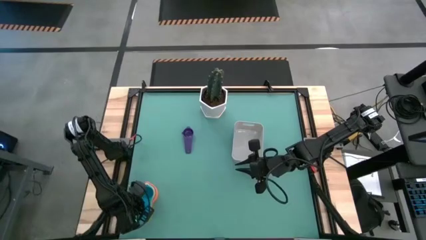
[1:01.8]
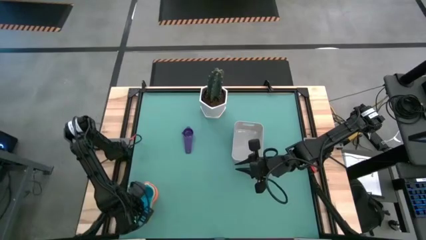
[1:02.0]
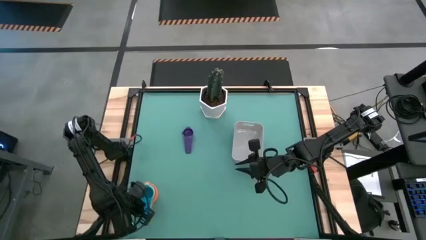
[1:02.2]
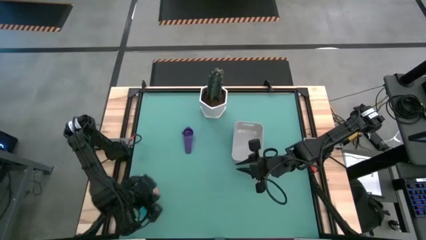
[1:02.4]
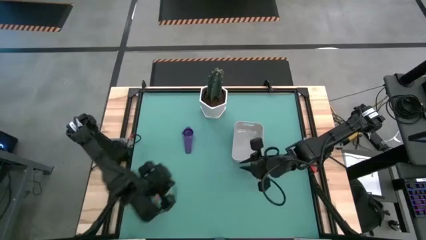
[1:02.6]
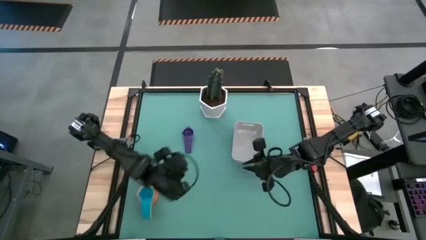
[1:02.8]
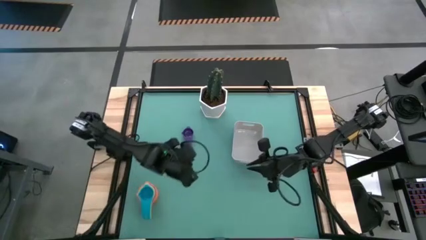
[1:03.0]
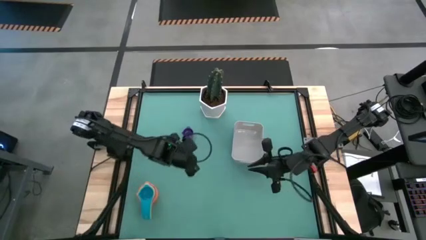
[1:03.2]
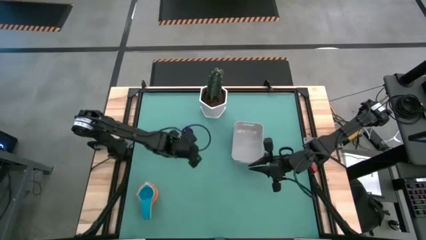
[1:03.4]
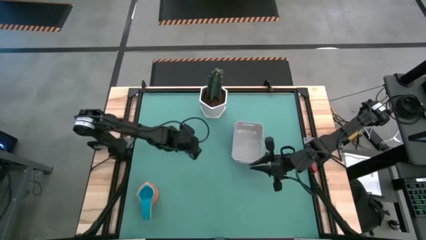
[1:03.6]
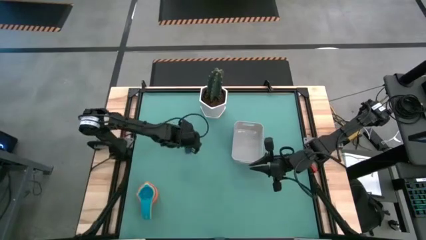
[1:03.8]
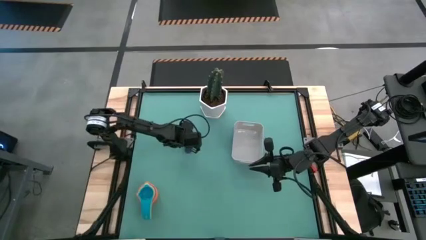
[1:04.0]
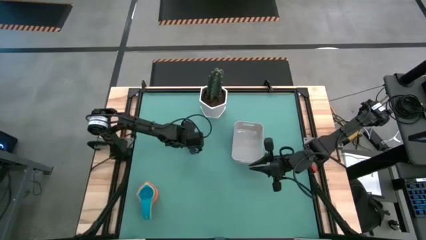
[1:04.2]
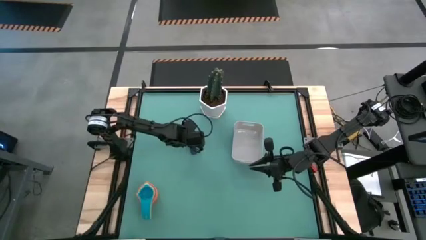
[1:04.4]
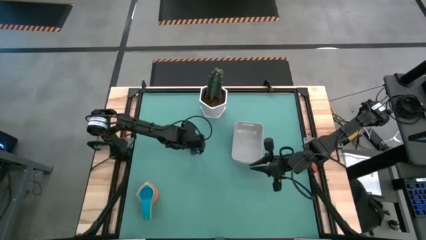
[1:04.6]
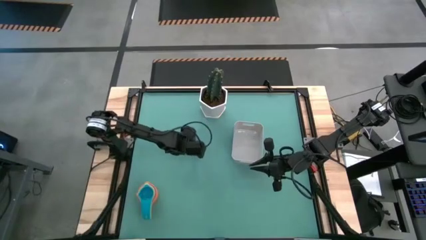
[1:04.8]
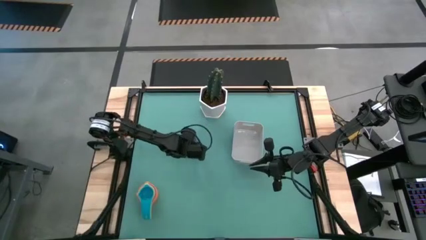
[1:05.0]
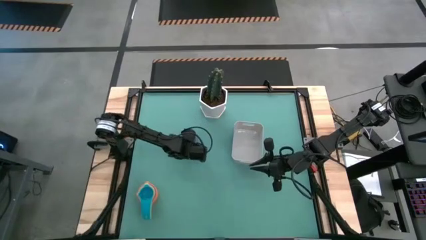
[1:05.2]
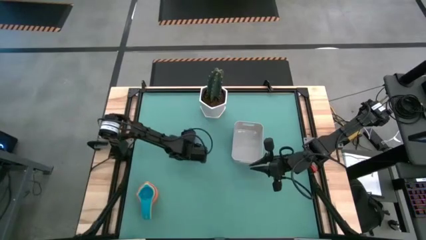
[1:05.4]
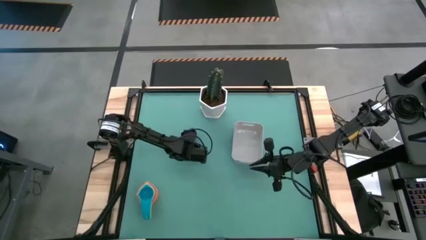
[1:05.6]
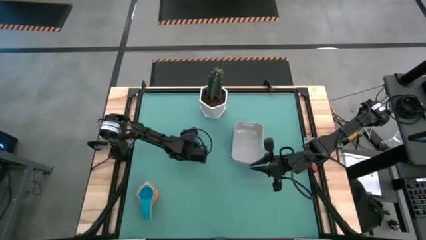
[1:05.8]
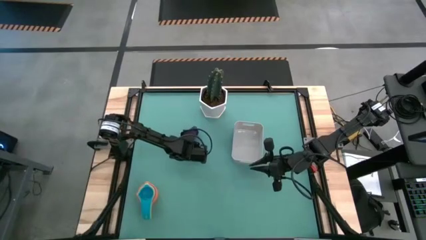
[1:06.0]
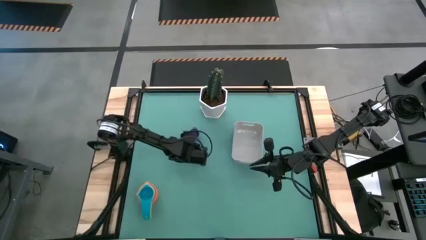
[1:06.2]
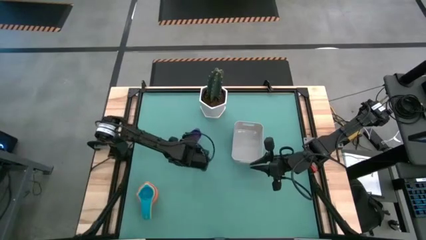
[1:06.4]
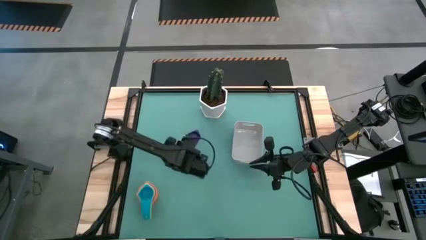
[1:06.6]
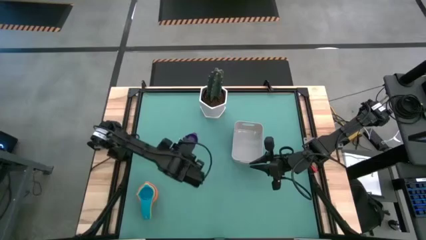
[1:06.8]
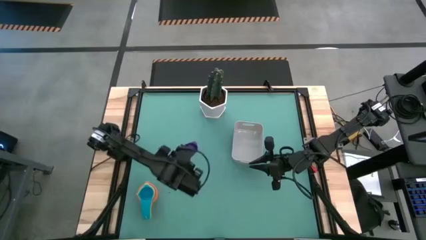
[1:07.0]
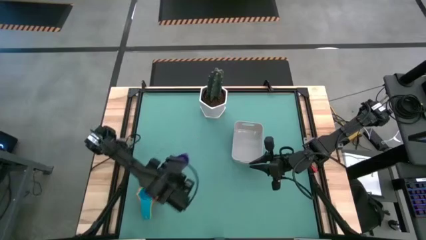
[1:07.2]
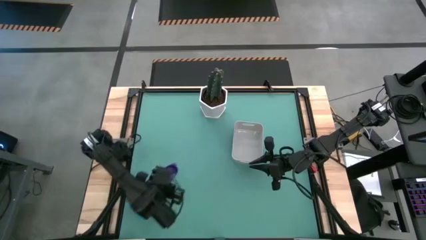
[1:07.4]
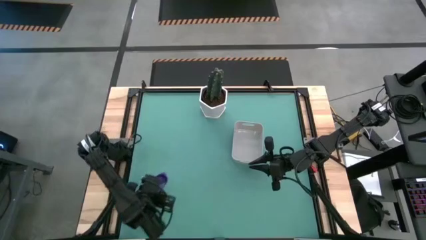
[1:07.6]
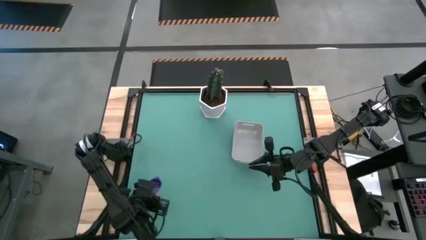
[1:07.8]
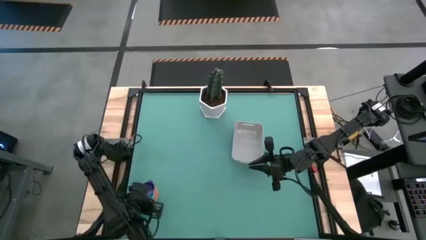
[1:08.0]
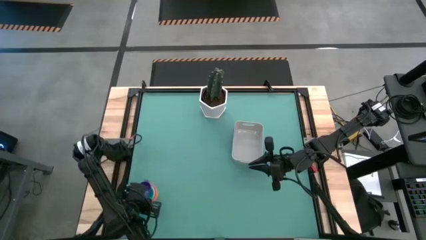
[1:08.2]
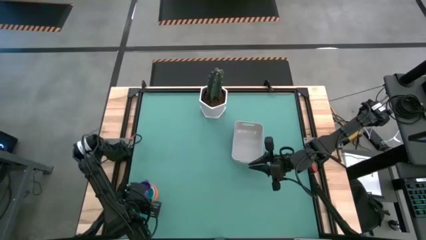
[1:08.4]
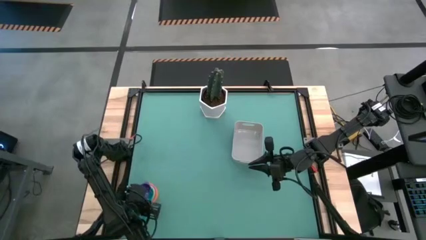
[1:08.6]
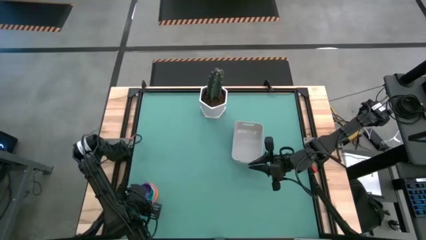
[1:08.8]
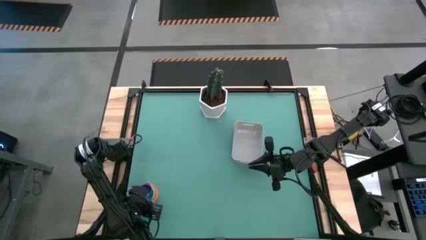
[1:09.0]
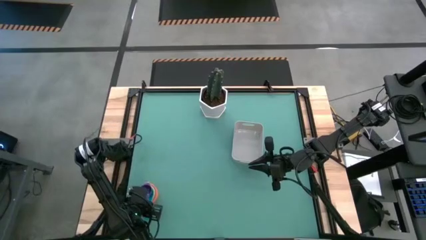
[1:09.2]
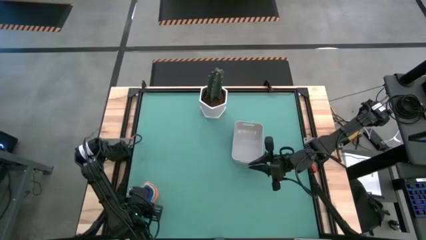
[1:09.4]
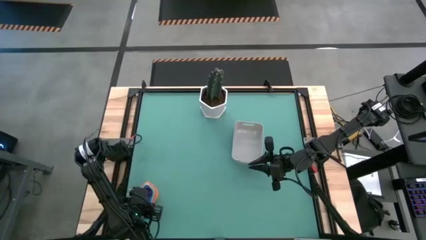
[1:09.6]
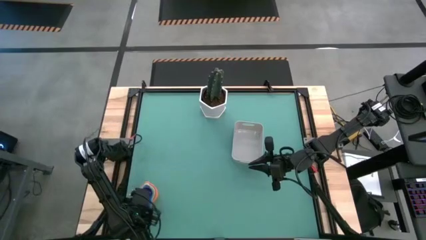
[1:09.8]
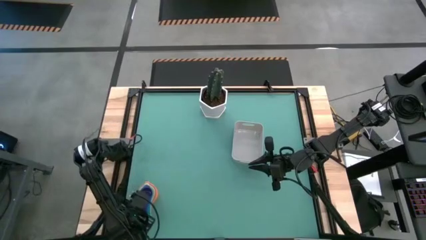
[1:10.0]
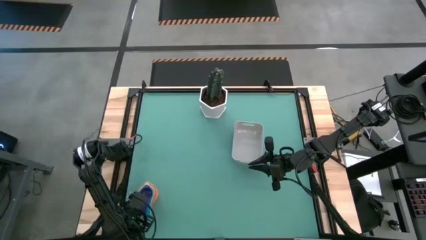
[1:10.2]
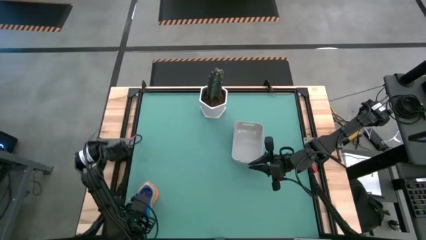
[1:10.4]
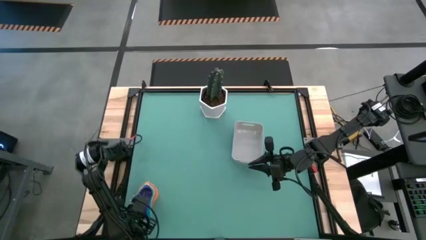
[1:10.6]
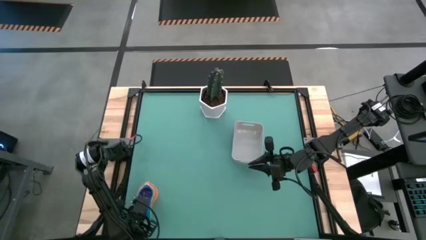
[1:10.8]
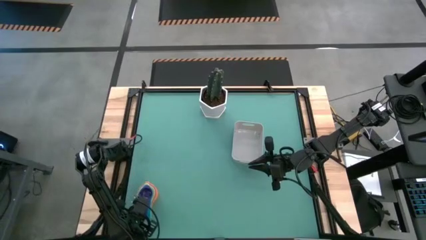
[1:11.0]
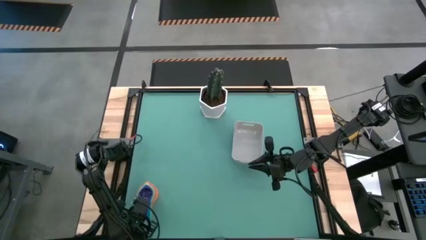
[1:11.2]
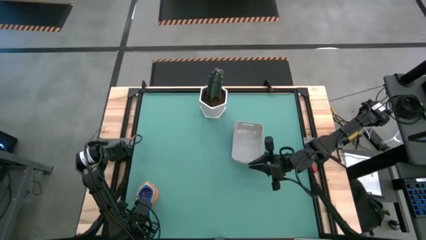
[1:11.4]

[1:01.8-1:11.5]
Task: Nest measuring cups in basket
Stack the violet measuring cup on the top of the light blue measuring cup

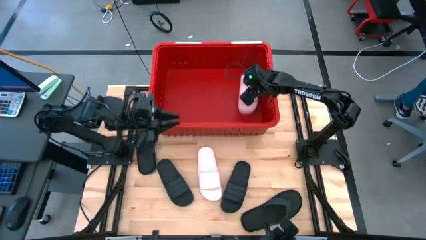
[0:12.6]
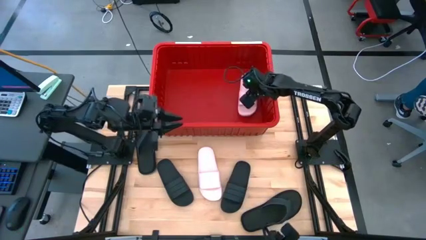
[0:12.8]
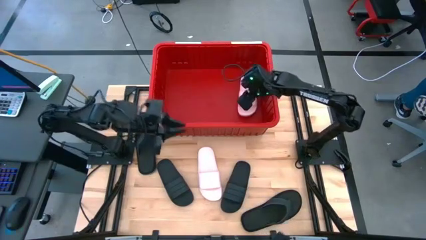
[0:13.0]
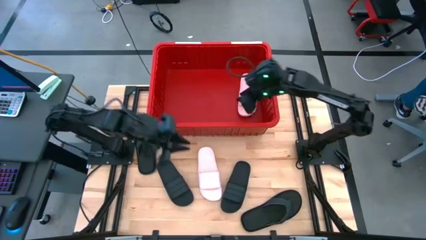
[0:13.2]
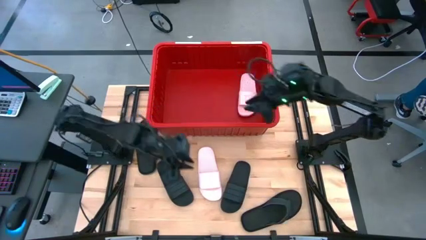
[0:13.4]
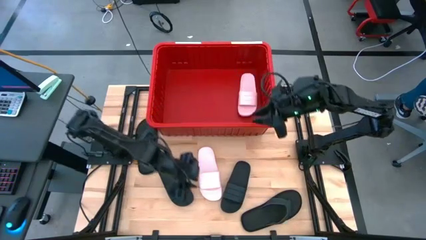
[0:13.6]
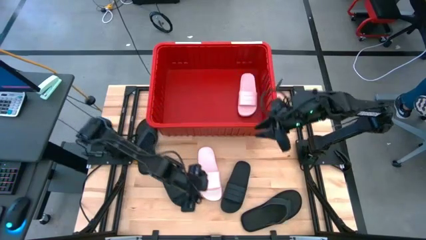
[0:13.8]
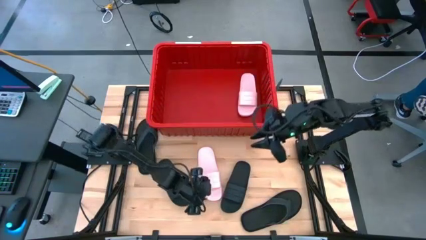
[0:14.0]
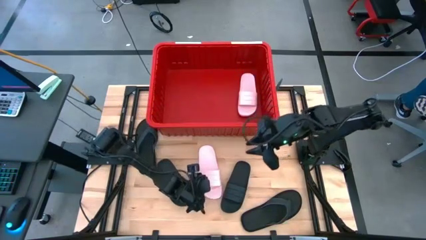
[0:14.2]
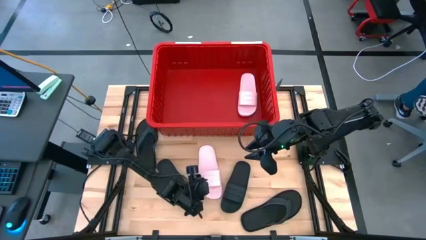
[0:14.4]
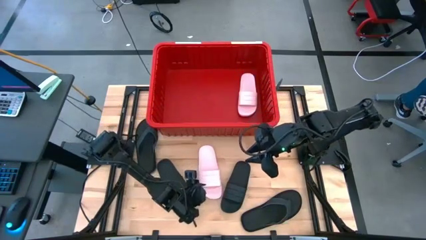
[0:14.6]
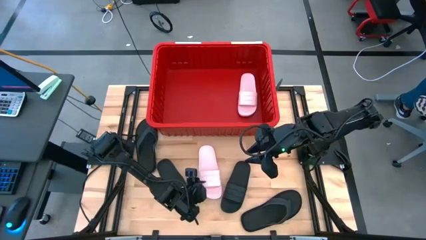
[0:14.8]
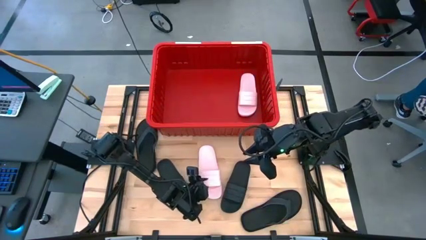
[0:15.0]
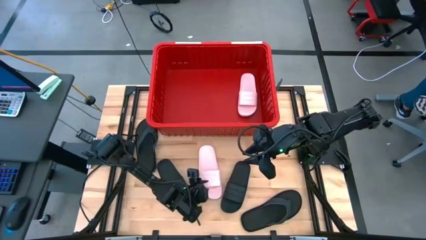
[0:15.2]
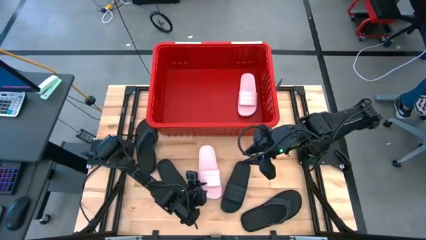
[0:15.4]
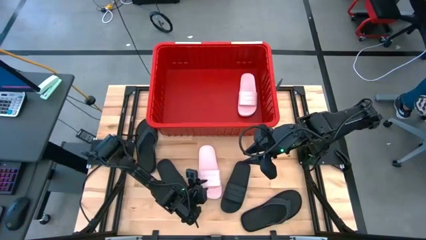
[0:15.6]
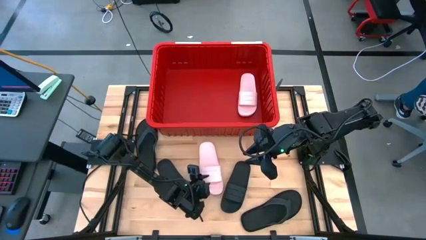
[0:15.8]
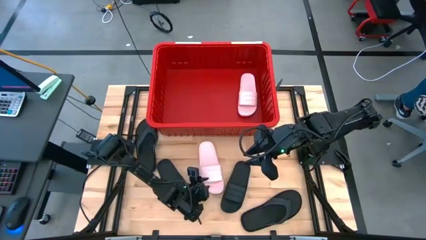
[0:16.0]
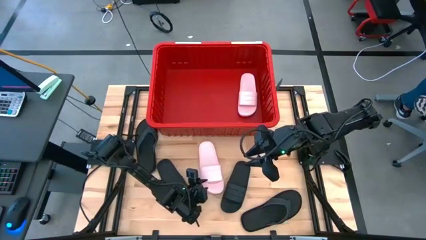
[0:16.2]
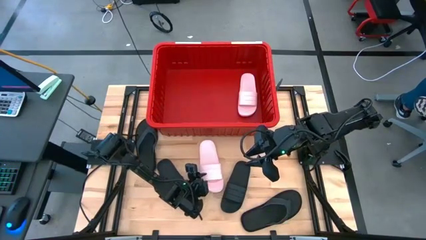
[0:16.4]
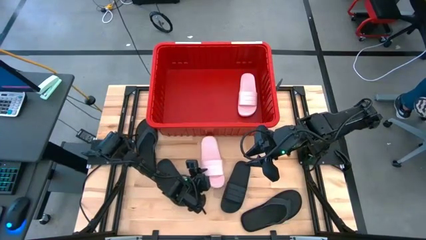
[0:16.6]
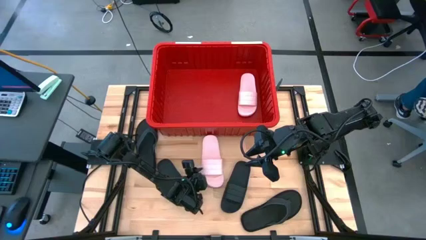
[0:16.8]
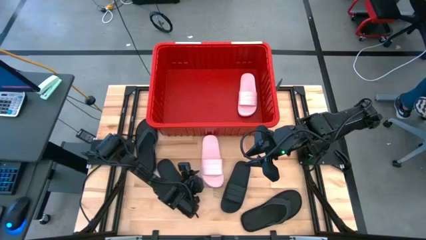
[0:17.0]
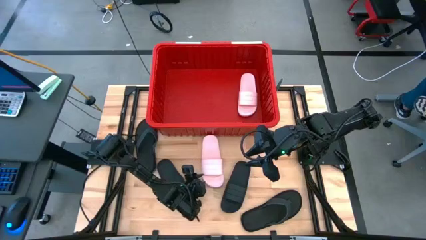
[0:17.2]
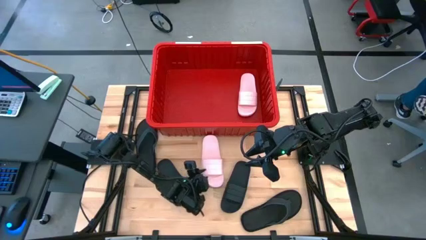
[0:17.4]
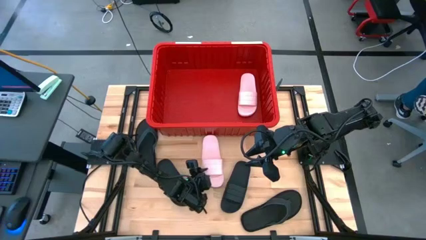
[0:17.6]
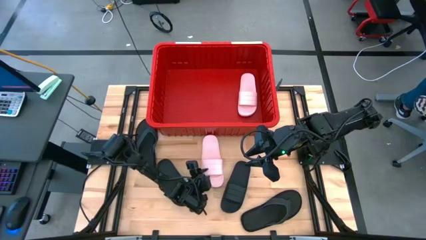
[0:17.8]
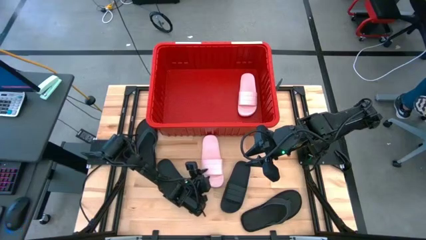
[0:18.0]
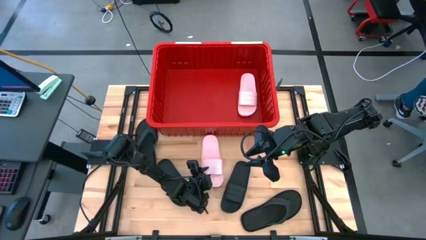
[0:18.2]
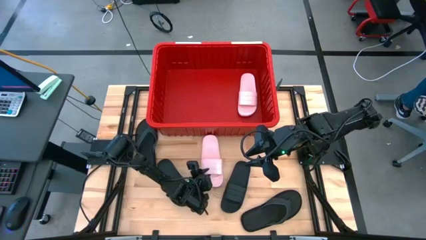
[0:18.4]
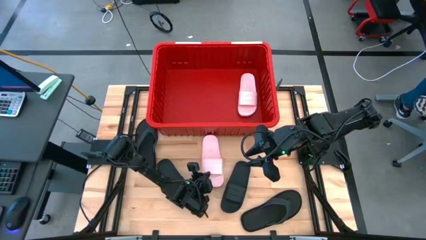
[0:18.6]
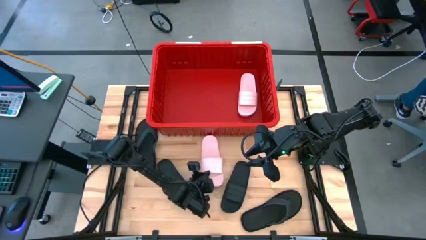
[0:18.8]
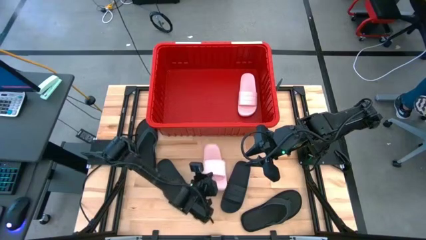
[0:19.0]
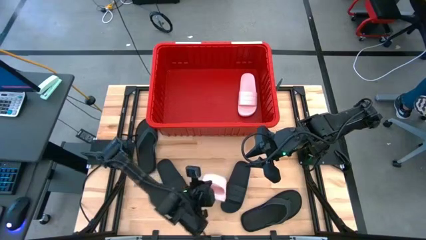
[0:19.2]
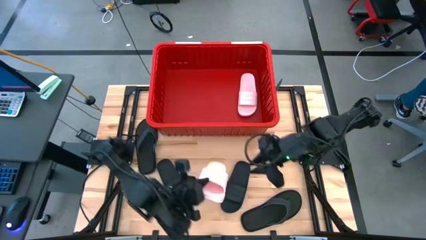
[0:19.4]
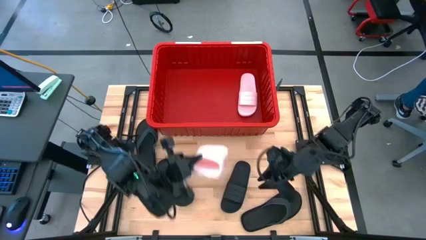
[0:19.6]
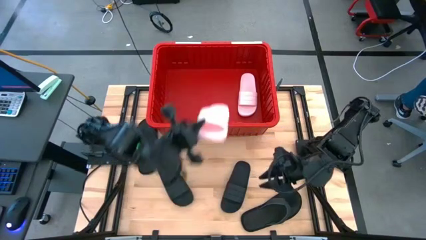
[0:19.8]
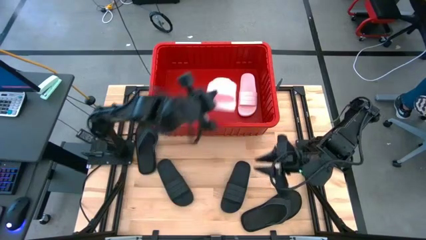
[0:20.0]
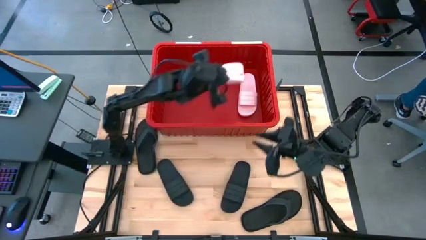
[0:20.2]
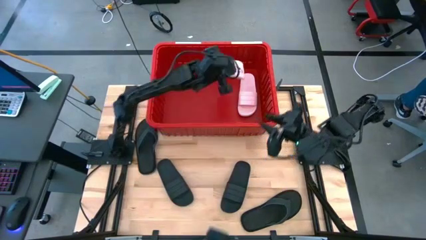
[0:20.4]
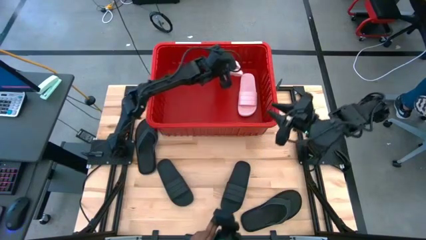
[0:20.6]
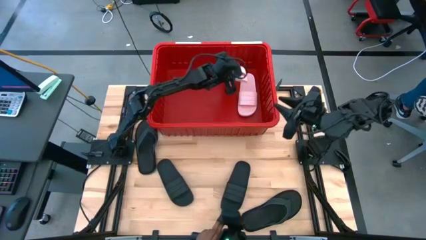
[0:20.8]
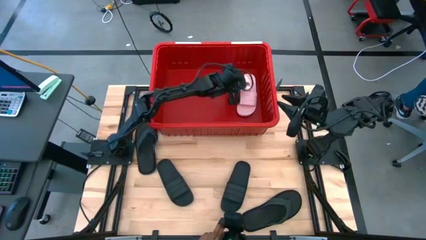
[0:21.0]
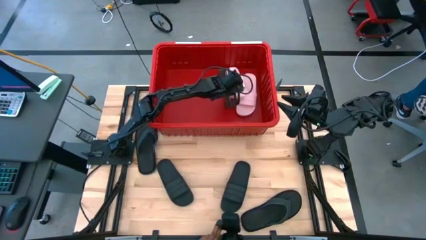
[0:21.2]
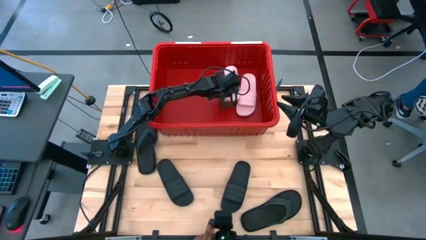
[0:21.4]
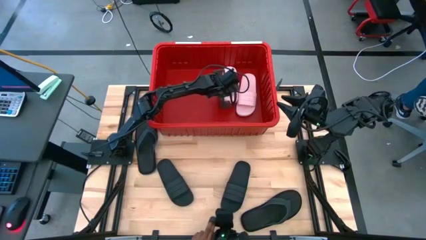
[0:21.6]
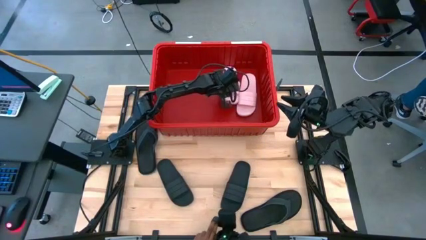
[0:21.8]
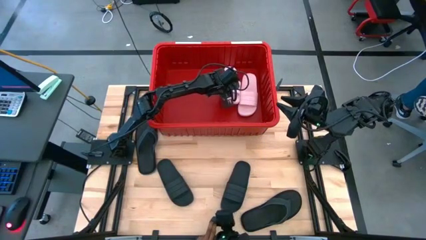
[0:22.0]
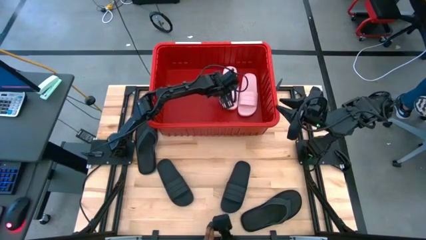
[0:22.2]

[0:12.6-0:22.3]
Task: Pick and place slides into bin
Put the pink slide into the red bin
